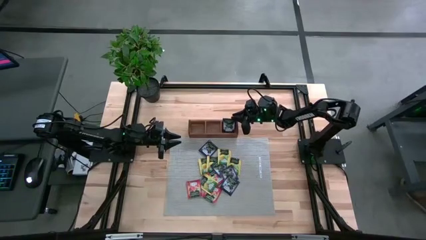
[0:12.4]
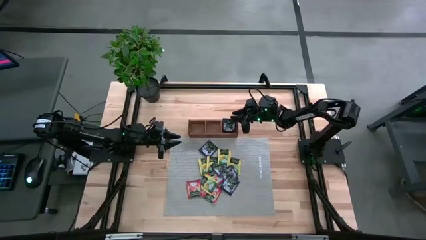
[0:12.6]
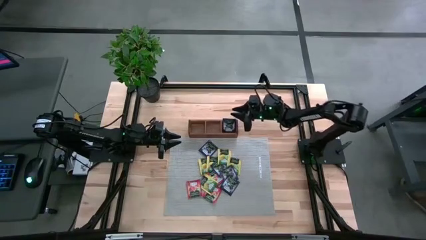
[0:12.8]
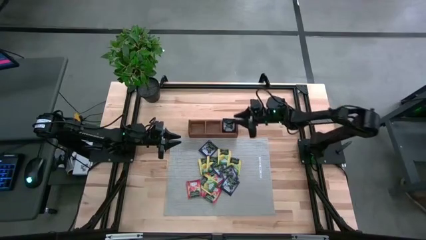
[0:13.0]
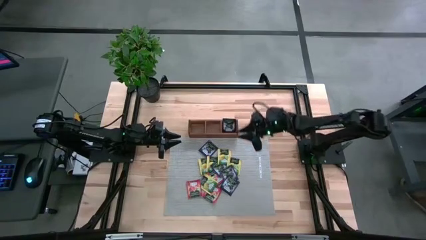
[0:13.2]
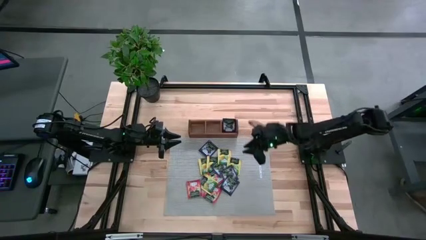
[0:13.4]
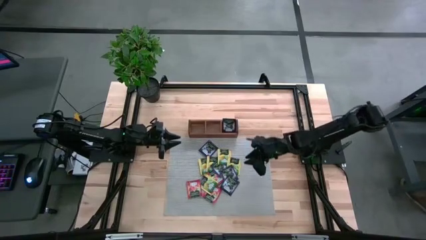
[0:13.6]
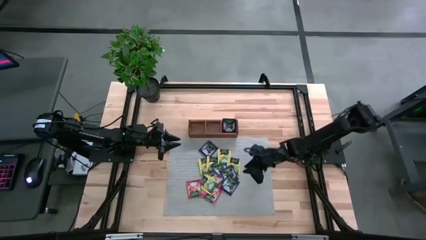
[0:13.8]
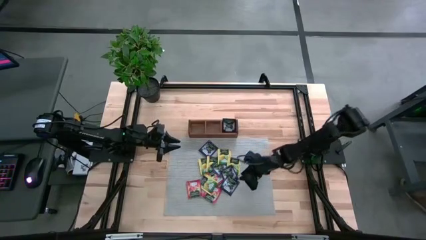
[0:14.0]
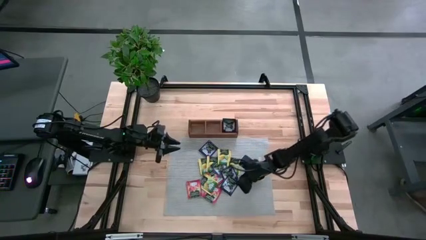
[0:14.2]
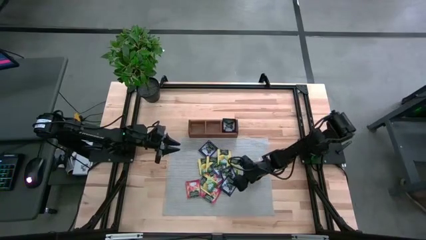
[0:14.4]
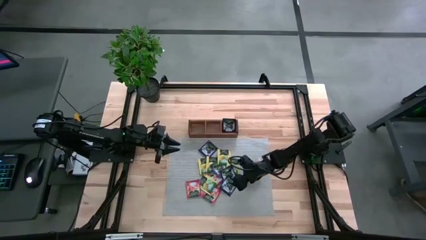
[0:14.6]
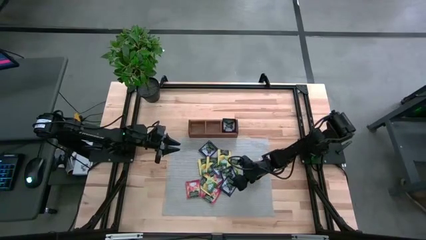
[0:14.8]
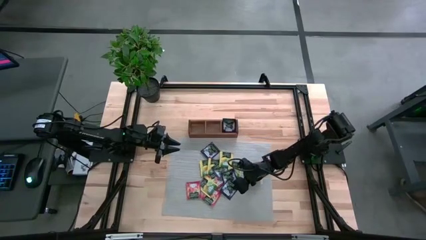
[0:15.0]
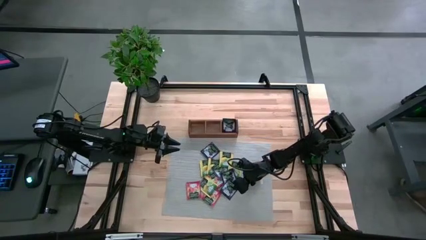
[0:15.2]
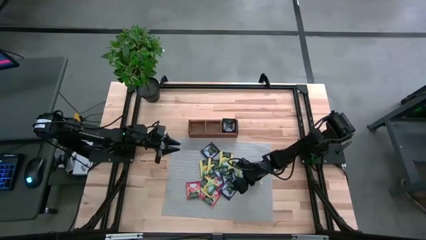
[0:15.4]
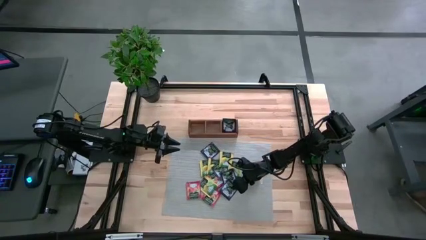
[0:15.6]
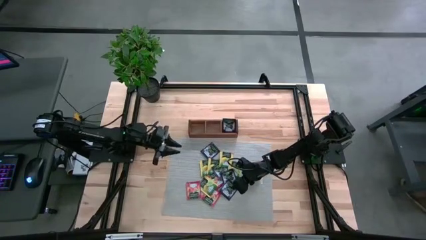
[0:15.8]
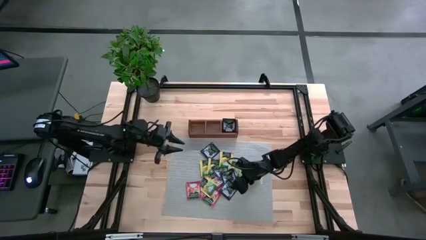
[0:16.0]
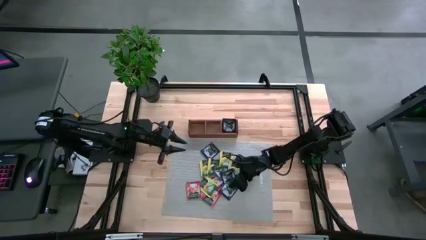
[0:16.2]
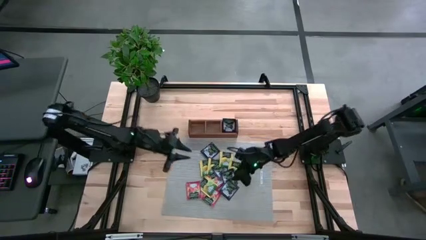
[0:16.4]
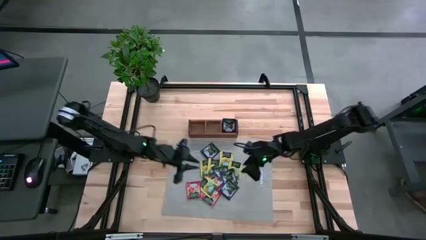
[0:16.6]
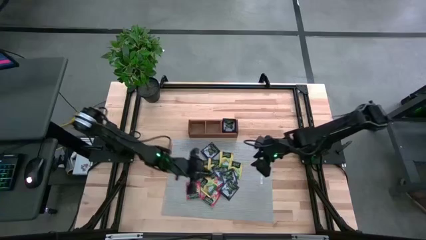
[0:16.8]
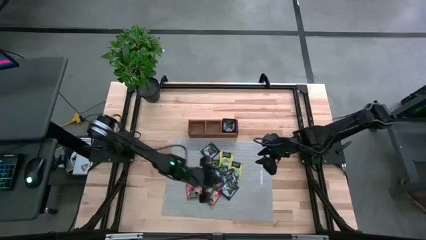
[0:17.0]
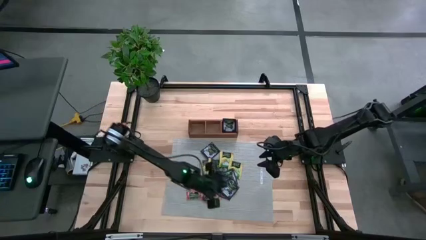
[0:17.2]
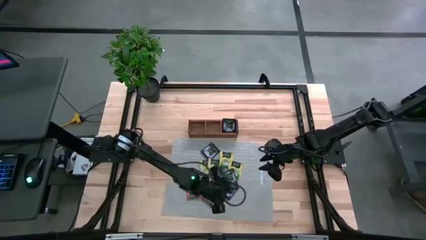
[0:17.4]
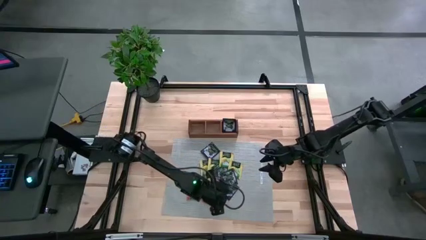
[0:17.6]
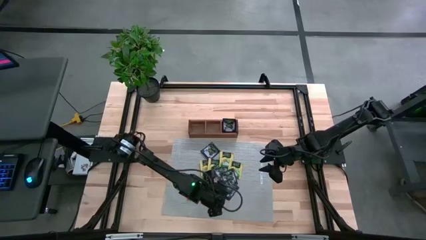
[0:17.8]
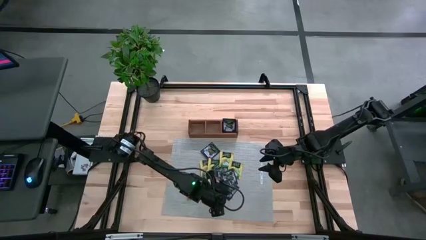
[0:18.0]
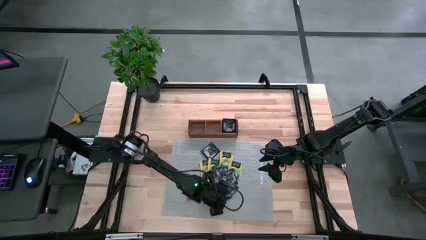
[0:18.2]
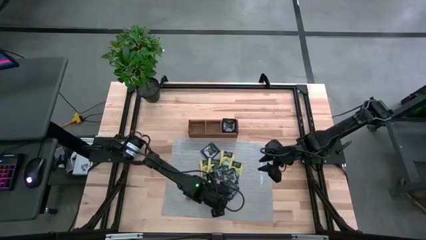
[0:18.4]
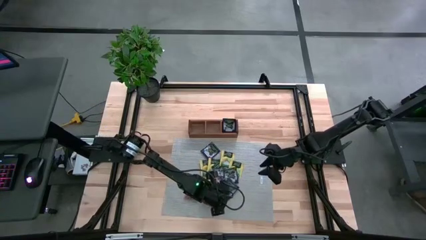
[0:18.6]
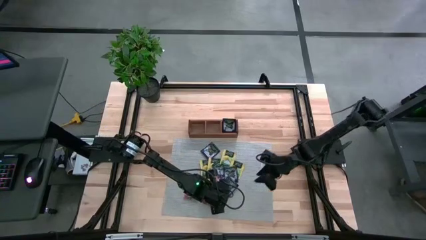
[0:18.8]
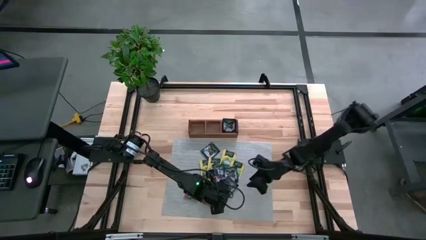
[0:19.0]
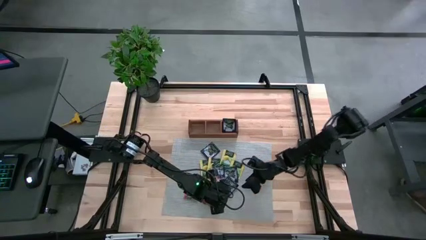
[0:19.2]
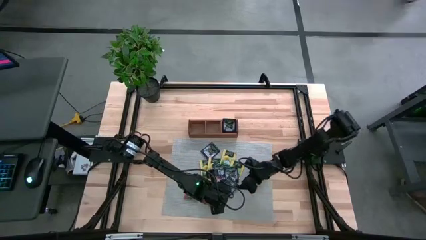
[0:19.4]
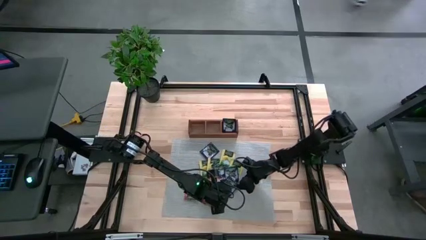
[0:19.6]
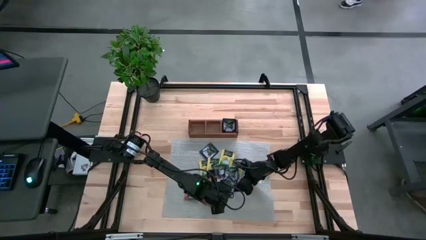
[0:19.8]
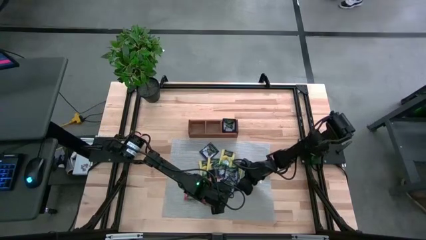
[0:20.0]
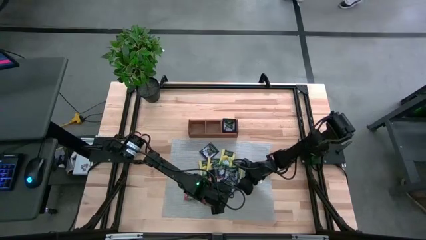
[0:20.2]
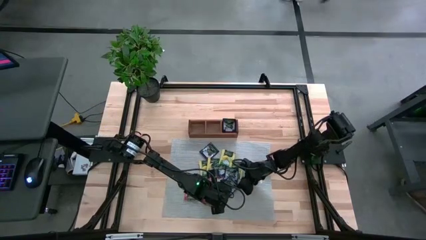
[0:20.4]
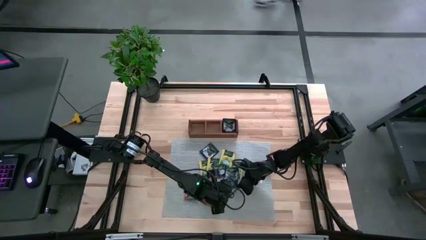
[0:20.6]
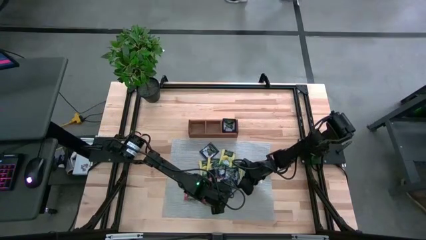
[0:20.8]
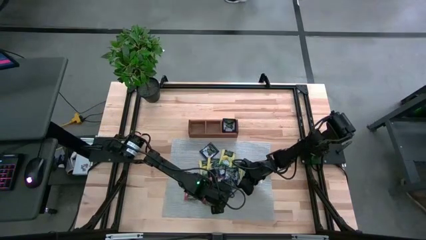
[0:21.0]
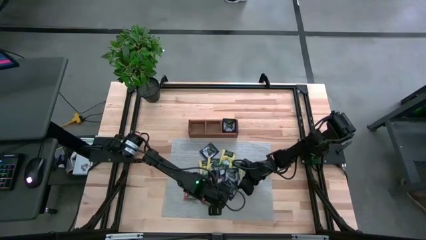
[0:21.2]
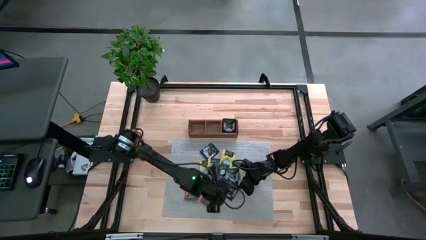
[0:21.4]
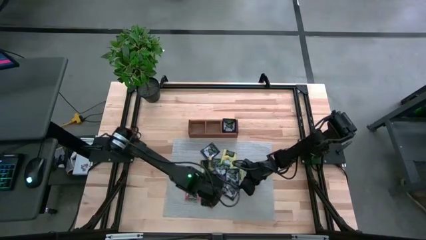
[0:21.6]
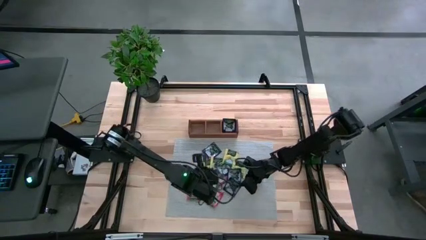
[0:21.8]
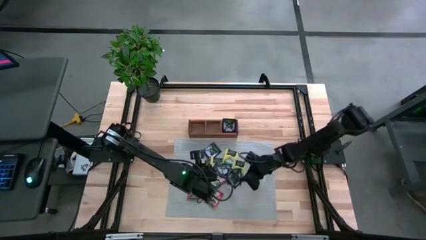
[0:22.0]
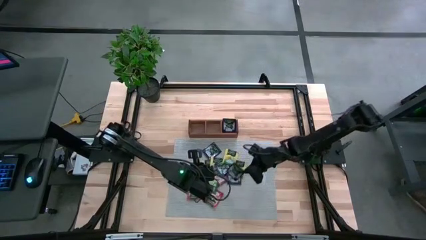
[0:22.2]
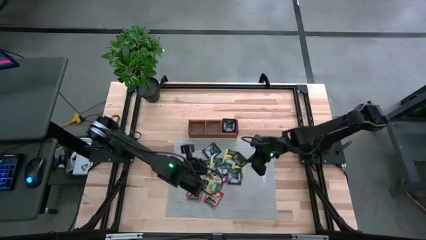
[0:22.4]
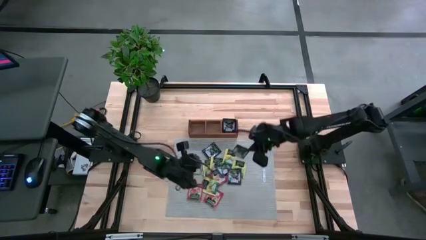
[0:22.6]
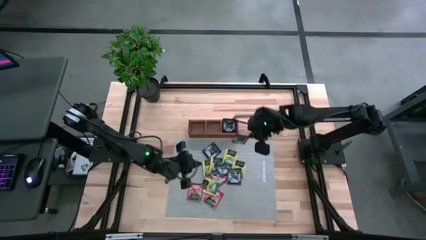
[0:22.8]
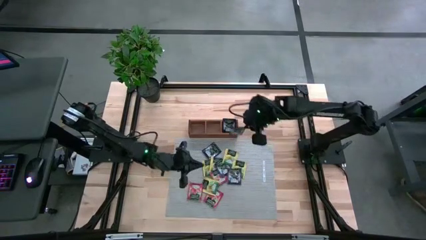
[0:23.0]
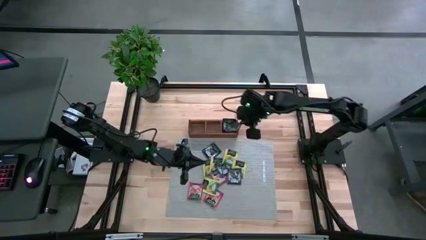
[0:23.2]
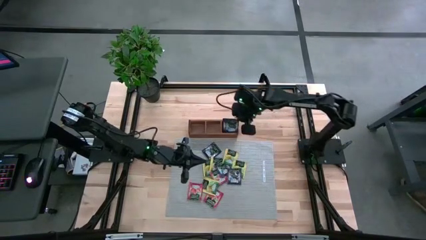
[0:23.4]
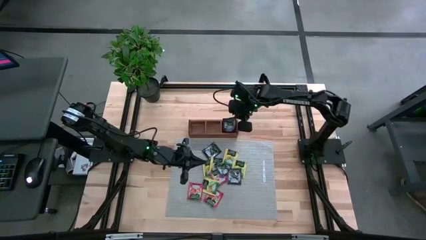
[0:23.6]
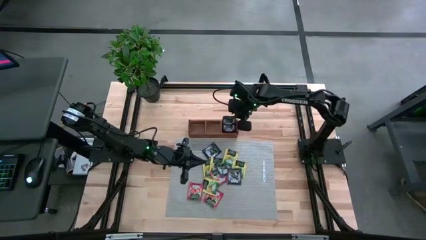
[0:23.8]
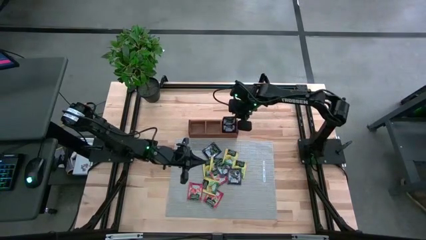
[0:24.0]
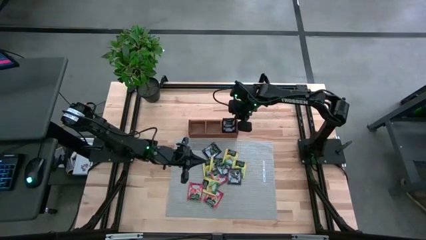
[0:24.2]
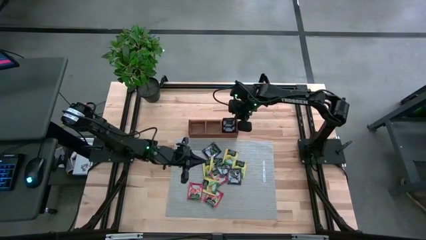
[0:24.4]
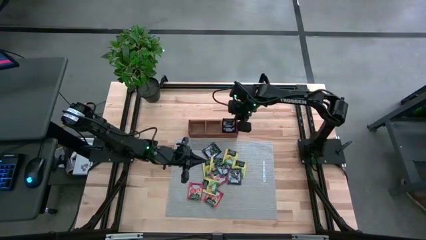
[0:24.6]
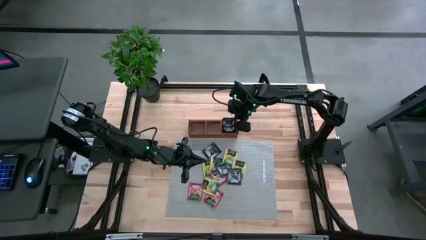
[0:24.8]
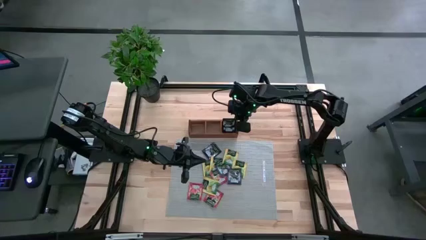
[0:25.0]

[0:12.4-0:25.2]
Task: Pick & Place Tea
Put the violet tea bag into the right section of the wooden organizer
